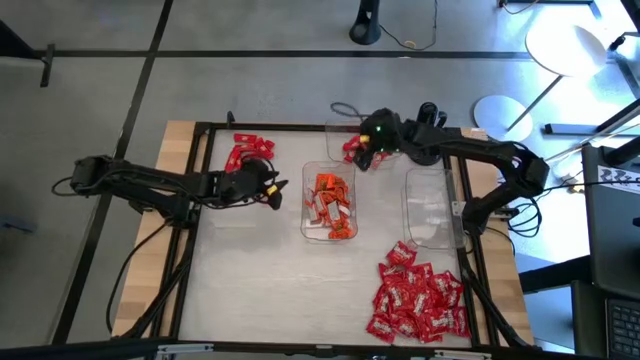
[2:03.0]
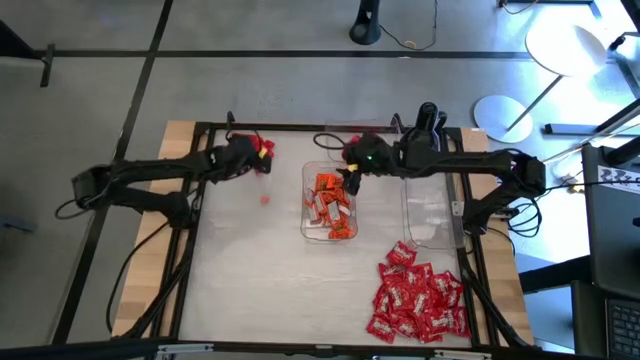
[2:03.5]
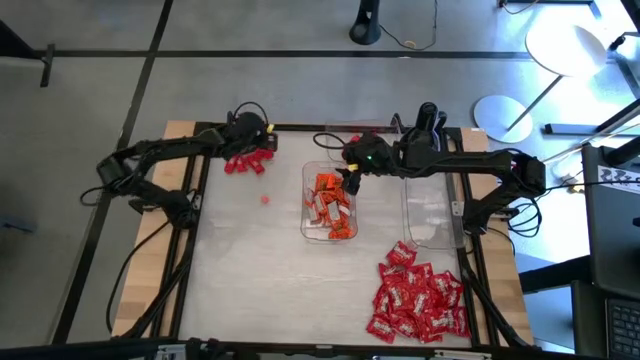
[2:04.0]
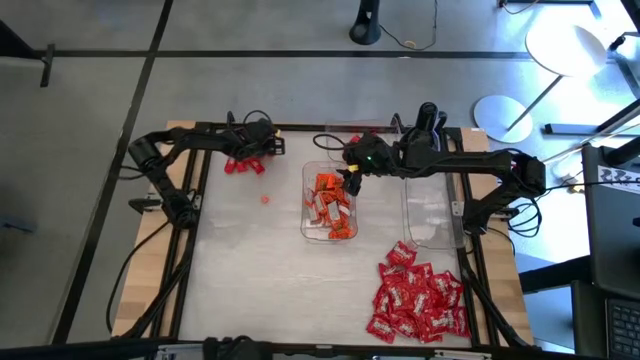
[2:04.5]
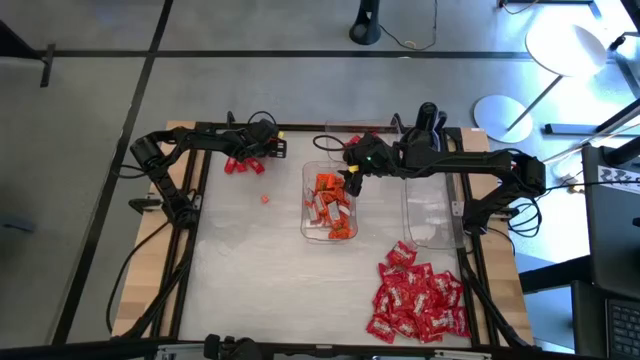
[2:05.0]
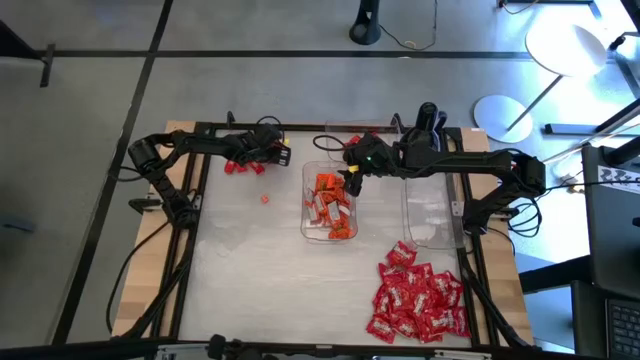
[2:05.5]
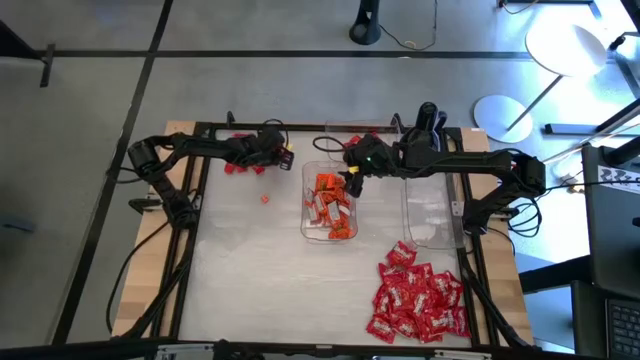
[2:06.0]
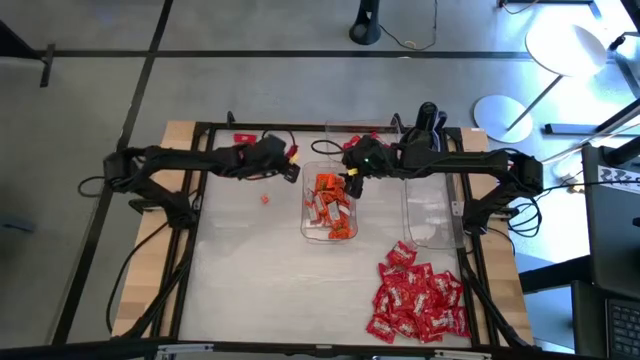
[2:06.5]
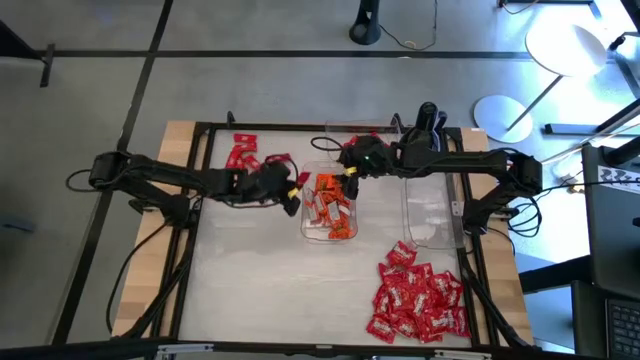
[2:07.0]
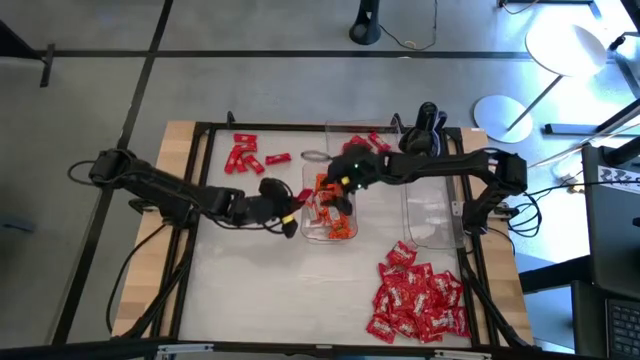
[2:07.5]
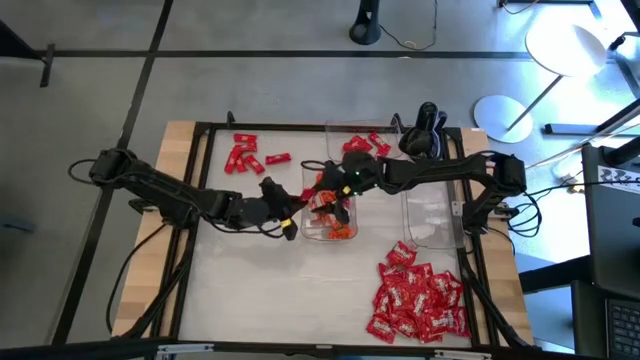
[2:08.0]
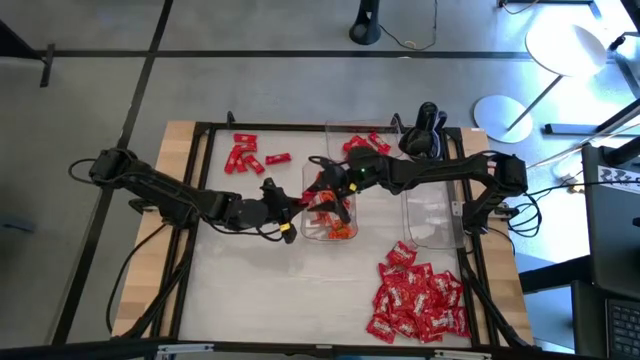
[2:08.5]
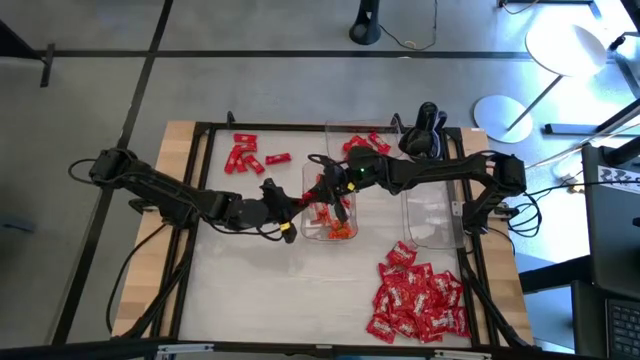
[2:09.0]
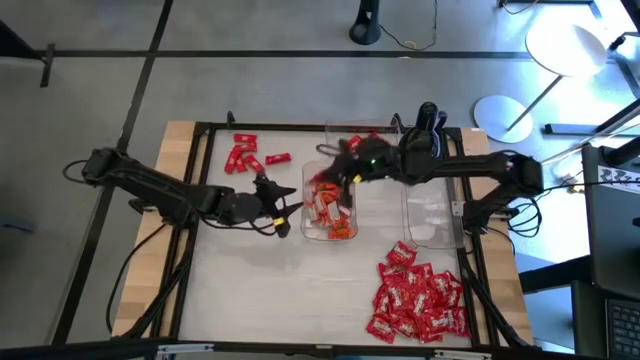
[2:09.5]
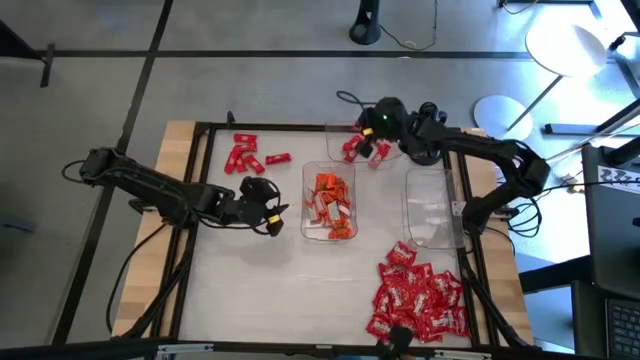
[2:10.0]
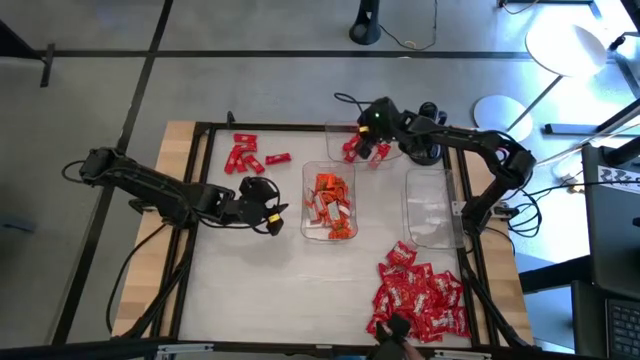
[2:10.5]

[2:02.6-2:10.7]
Task: Sort candy
Put the red chocolate into the top transparent bin

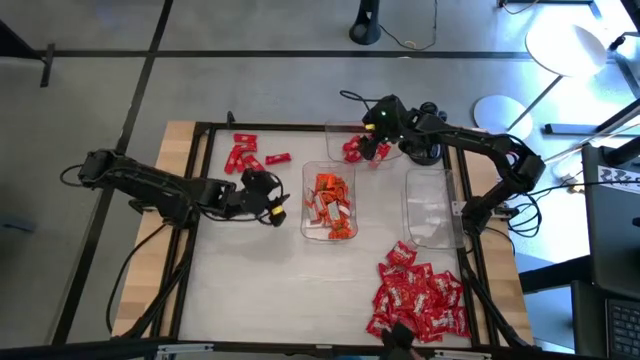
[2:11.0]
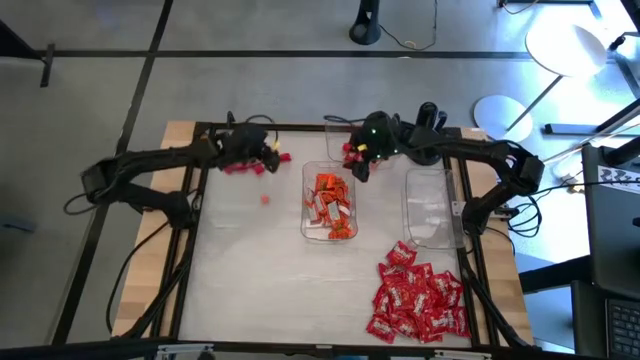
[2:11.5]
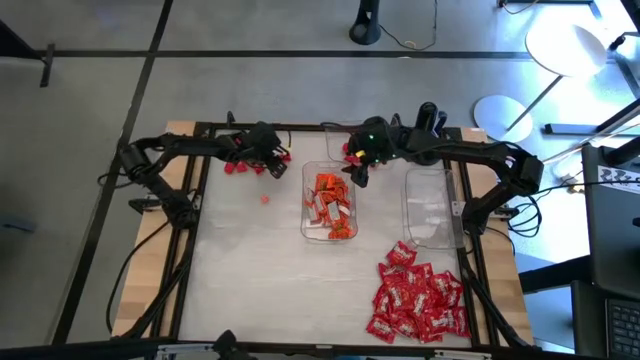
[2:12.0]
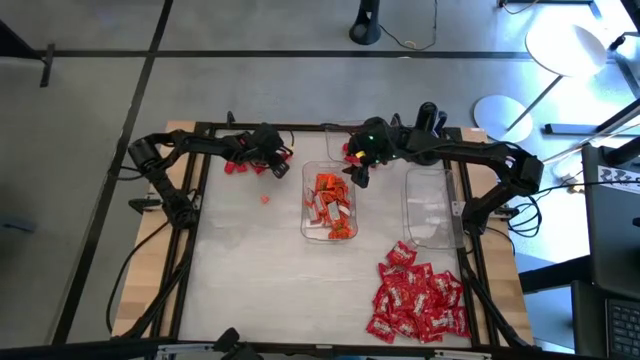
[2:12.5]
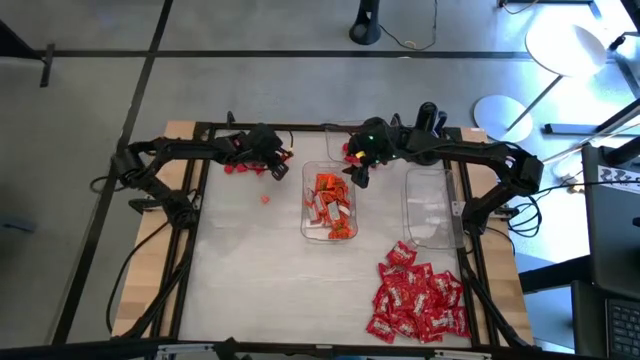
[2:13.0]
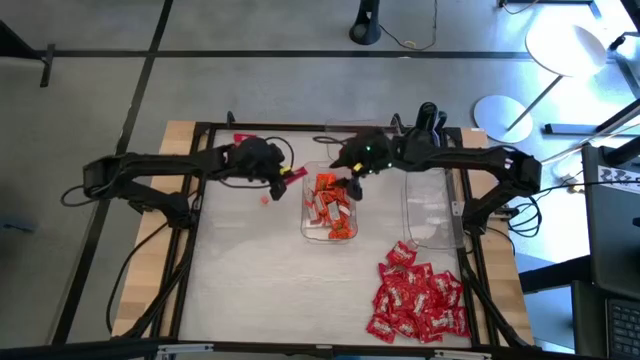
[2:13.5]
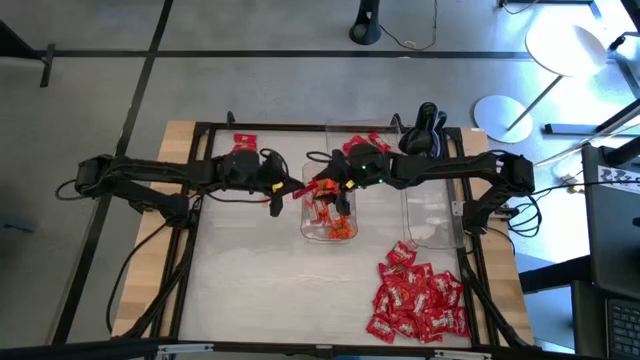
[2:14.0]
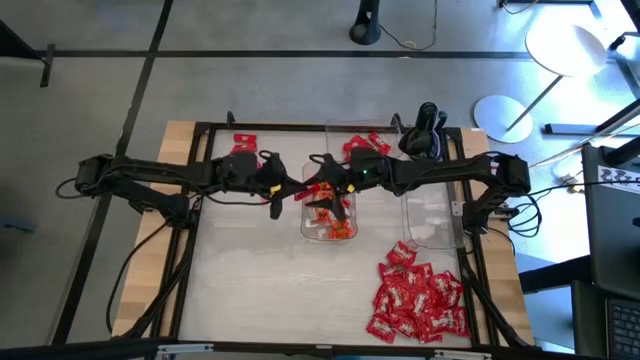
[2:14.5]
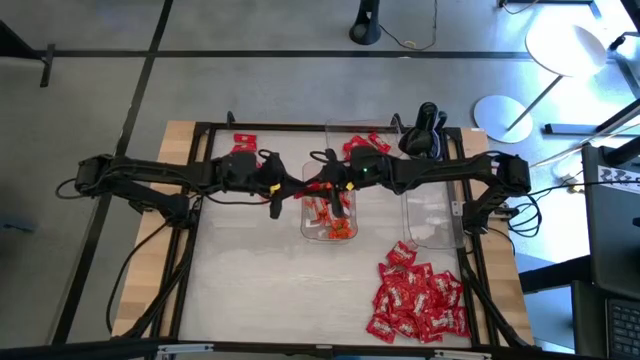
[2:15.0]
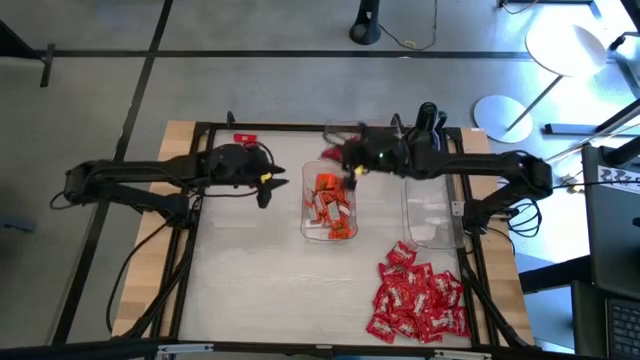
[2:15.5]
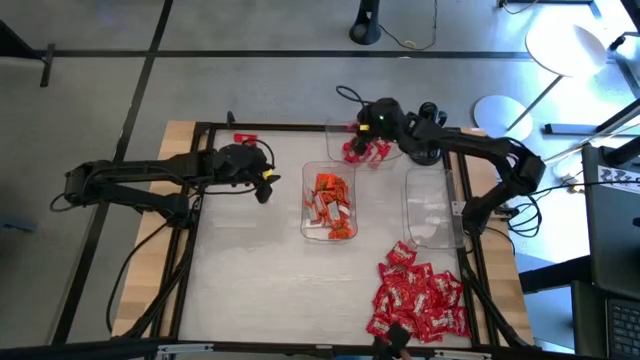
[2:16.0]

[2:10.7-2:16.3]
Put the red chocolate into the top transparent bin

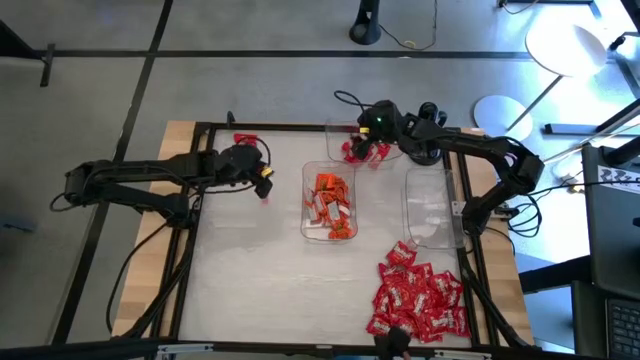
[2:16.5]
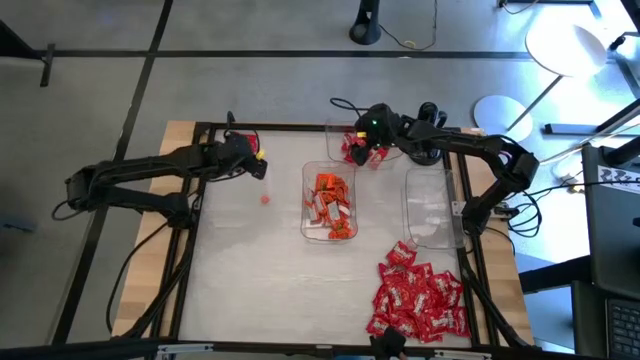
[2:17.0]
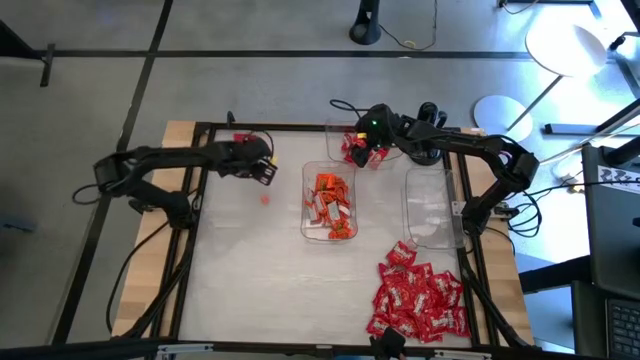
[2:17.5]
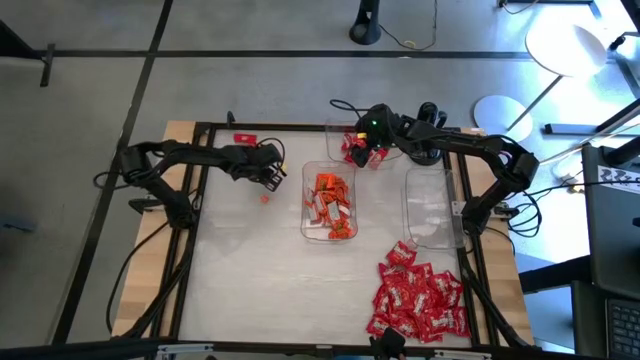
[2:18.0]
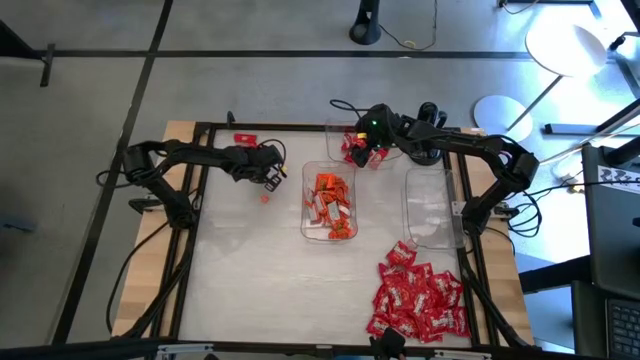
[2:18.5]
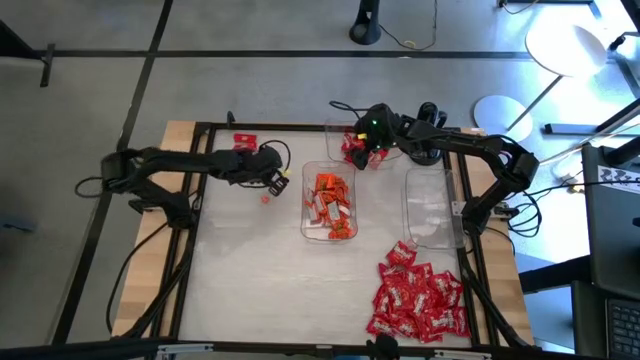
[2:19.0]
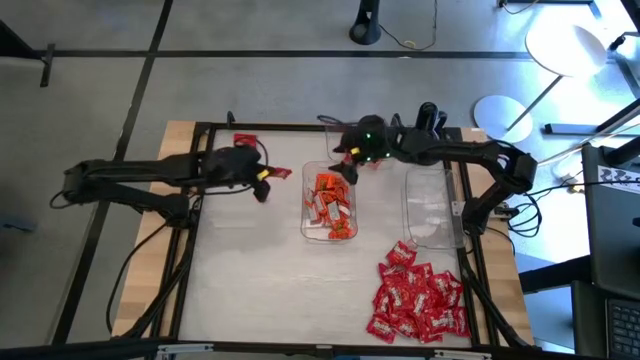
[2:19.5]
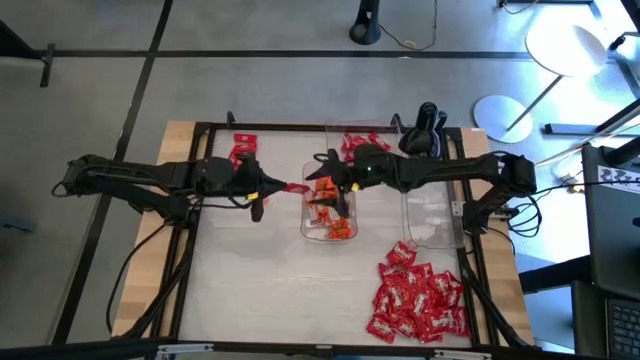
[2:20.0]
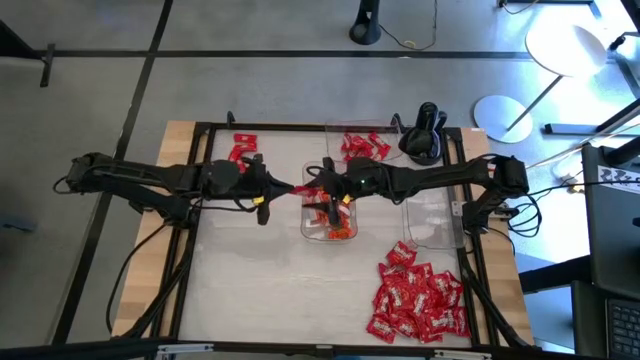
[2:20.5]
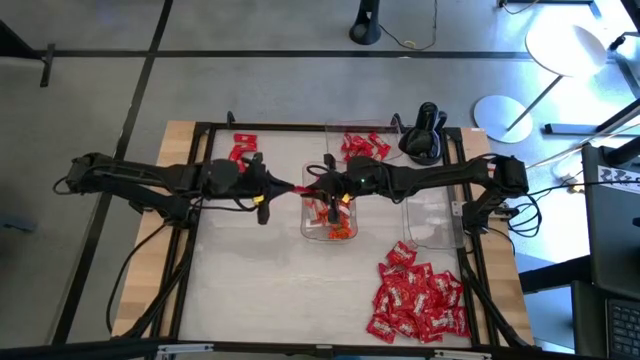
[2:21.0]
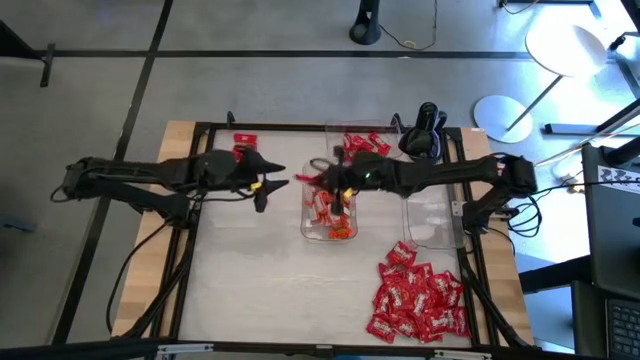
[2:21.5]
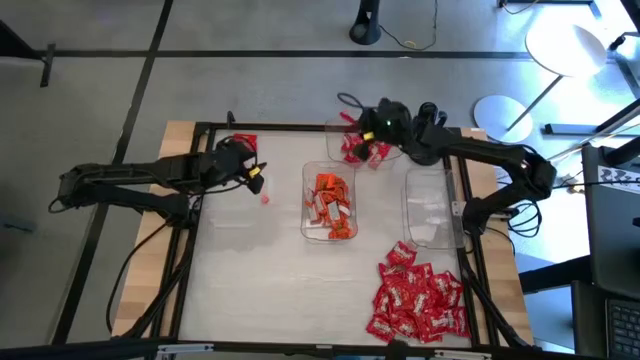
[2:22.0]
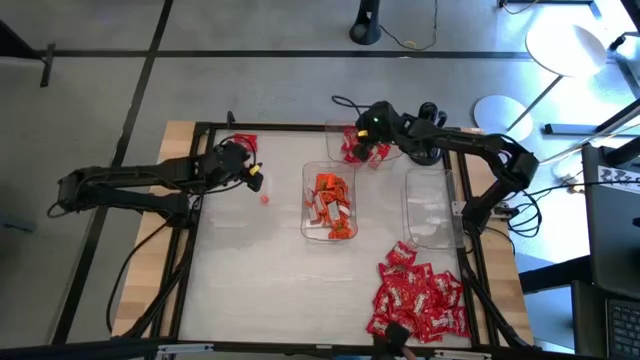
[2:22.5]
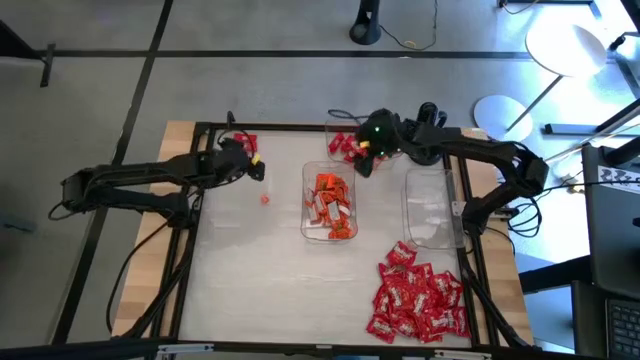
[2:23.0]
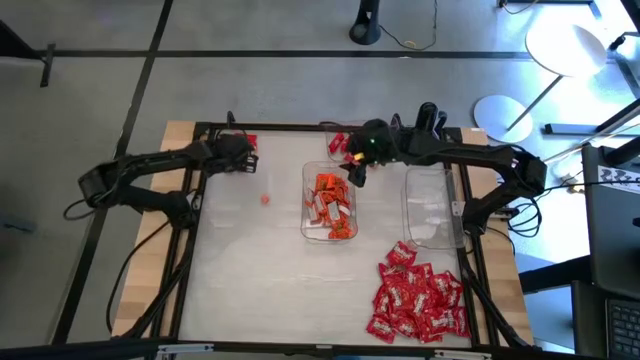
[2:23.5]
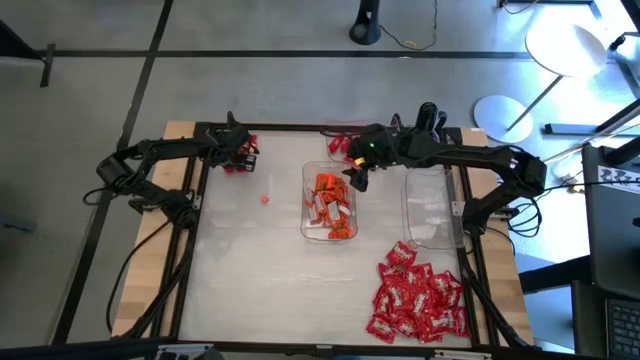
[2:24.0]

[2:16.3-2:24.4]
Put the red chocolate into the top transparent bin
